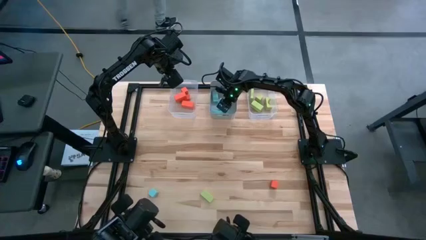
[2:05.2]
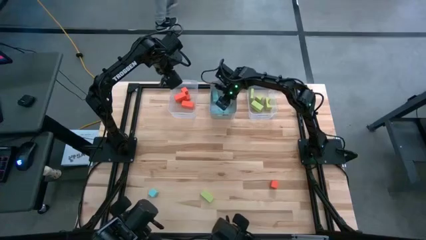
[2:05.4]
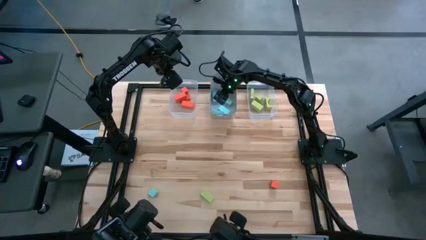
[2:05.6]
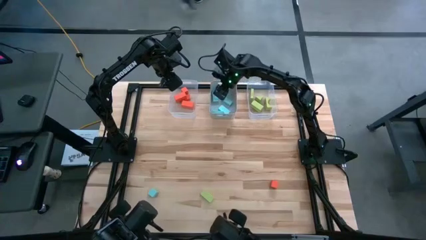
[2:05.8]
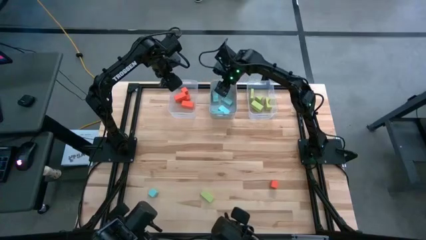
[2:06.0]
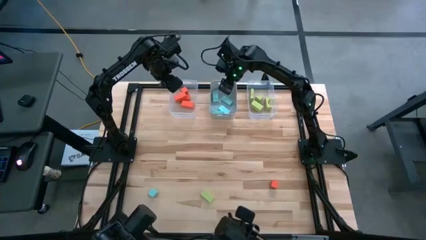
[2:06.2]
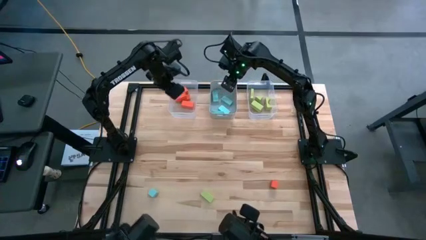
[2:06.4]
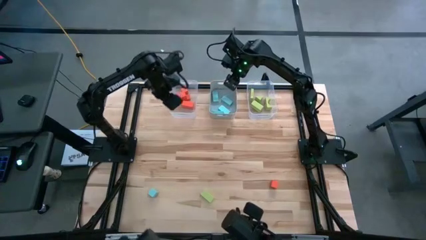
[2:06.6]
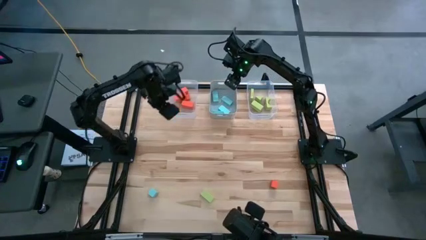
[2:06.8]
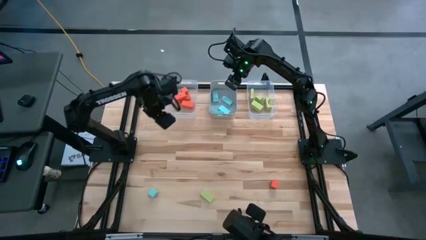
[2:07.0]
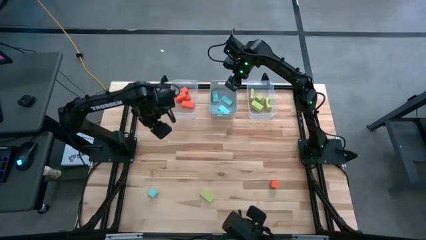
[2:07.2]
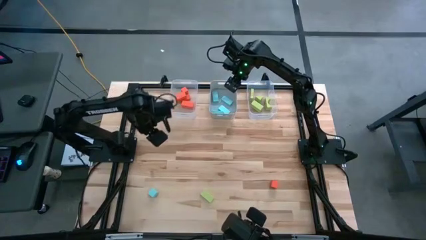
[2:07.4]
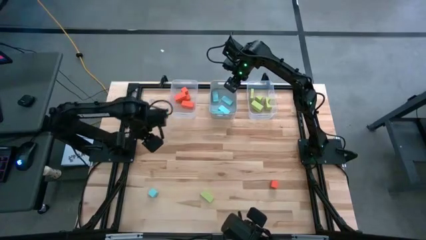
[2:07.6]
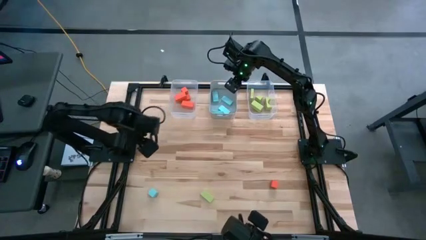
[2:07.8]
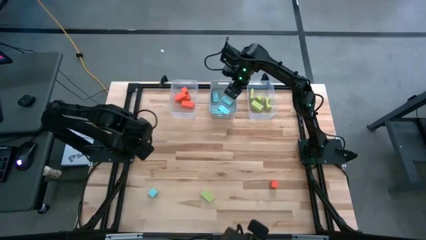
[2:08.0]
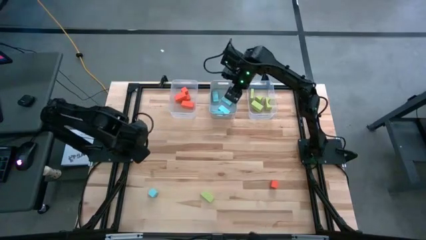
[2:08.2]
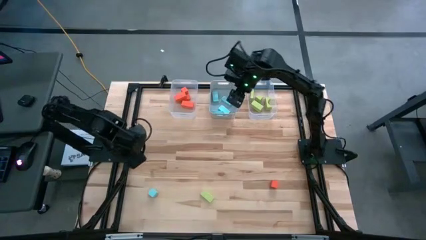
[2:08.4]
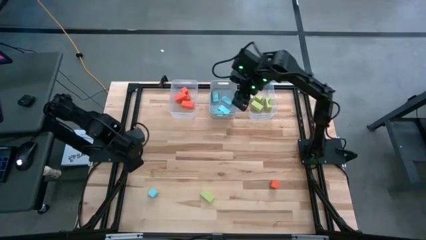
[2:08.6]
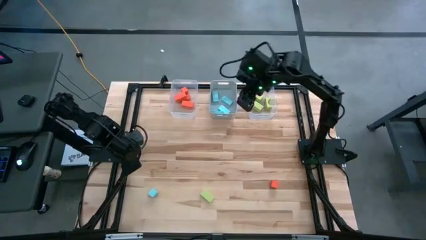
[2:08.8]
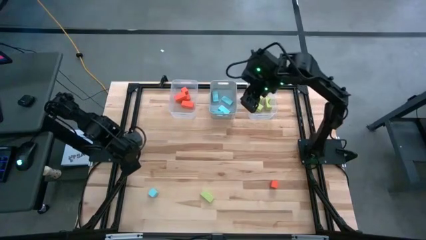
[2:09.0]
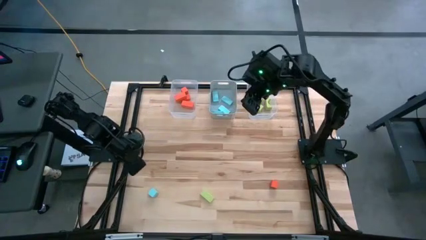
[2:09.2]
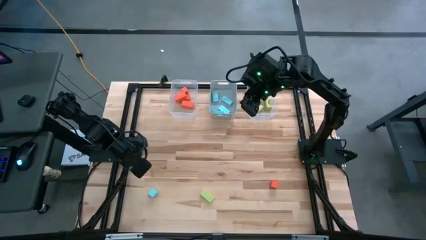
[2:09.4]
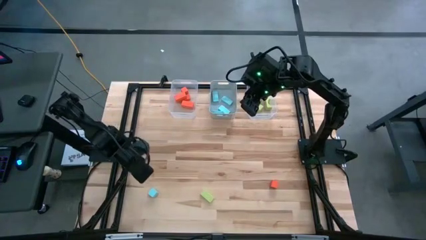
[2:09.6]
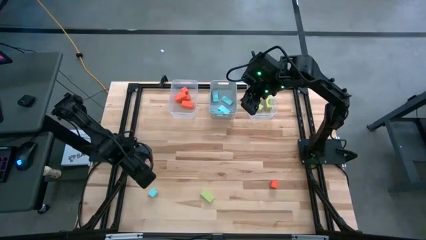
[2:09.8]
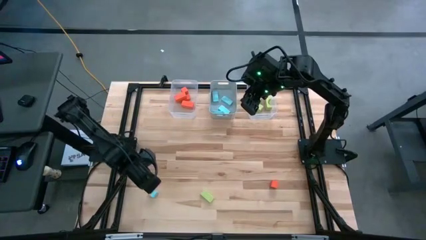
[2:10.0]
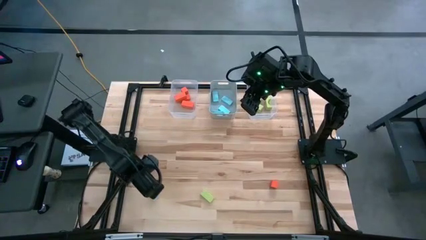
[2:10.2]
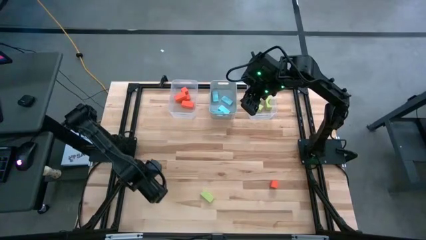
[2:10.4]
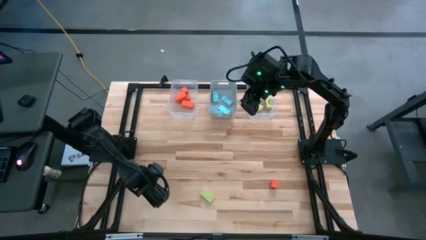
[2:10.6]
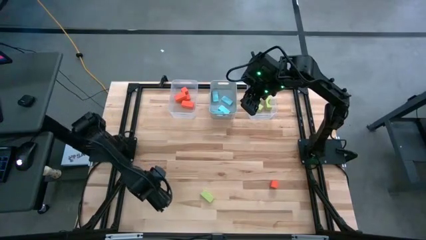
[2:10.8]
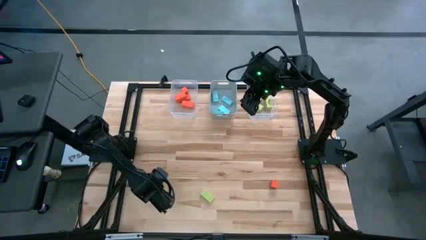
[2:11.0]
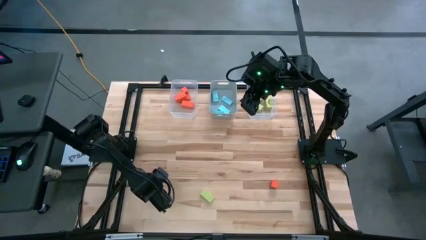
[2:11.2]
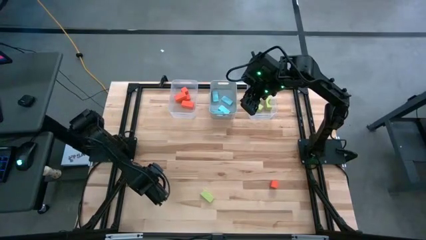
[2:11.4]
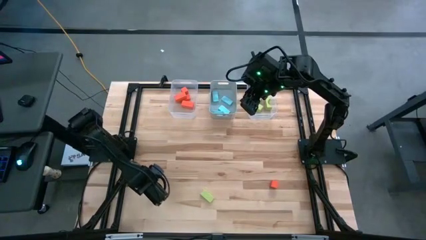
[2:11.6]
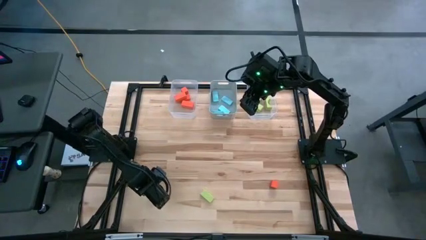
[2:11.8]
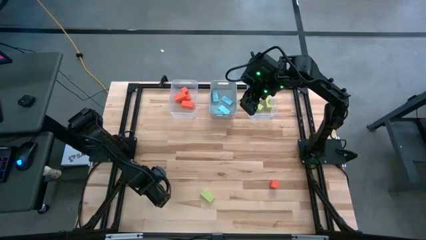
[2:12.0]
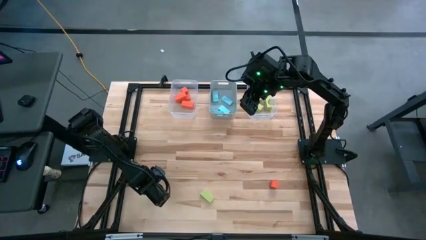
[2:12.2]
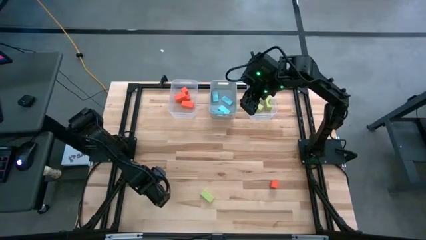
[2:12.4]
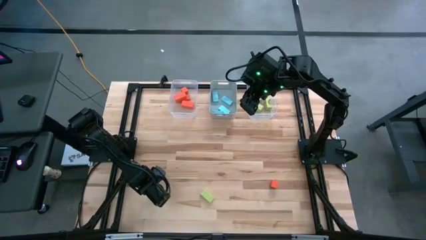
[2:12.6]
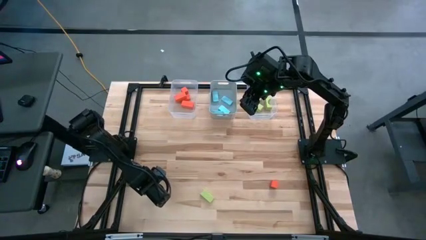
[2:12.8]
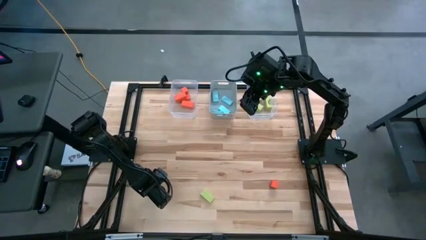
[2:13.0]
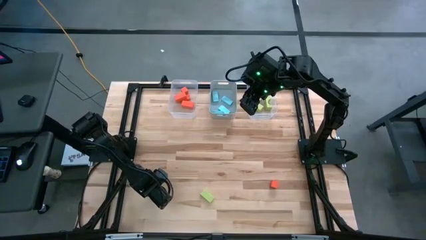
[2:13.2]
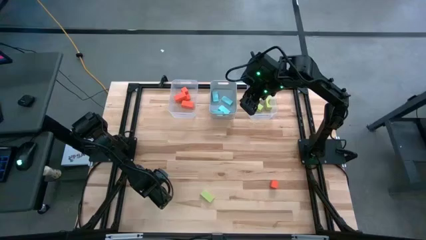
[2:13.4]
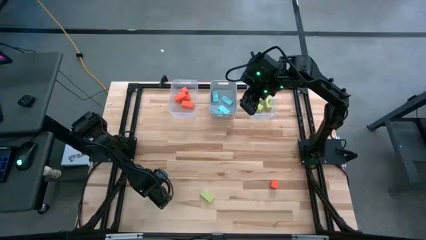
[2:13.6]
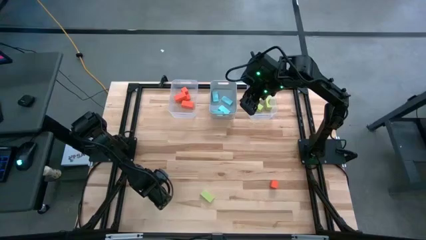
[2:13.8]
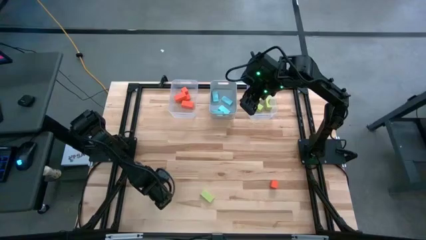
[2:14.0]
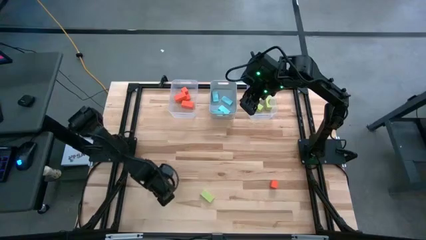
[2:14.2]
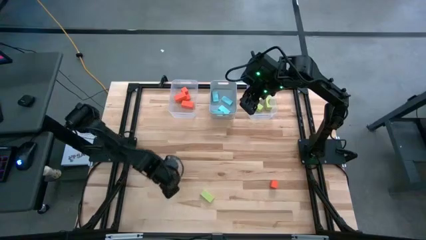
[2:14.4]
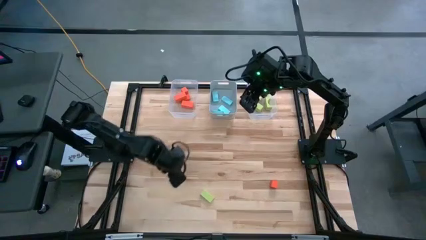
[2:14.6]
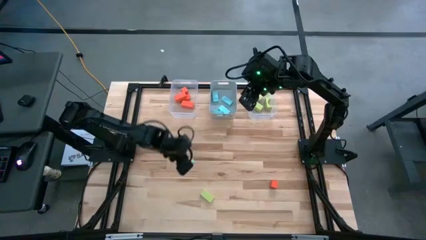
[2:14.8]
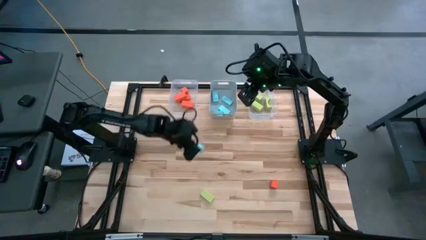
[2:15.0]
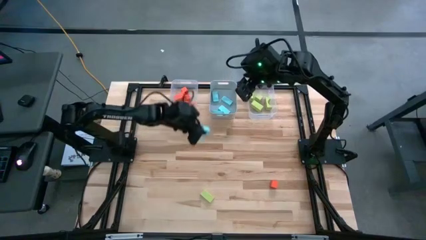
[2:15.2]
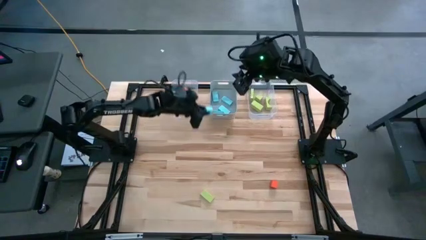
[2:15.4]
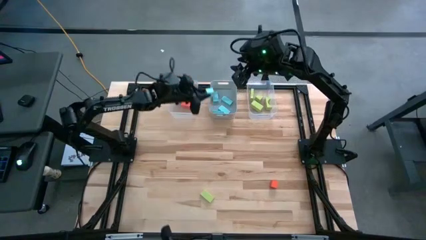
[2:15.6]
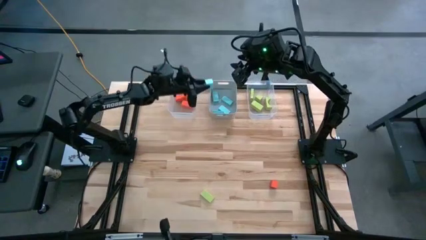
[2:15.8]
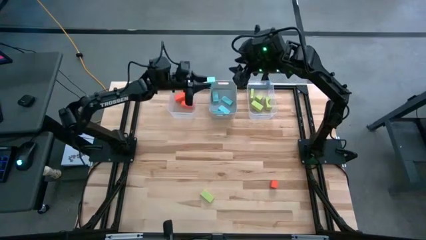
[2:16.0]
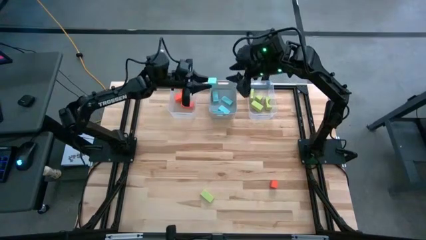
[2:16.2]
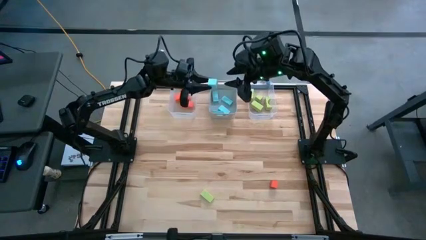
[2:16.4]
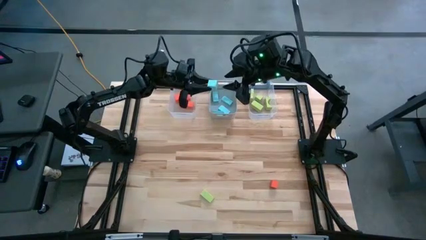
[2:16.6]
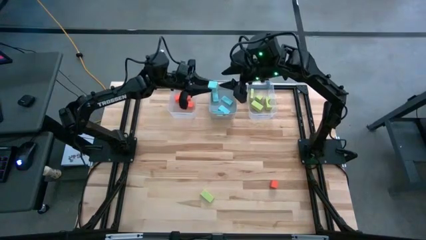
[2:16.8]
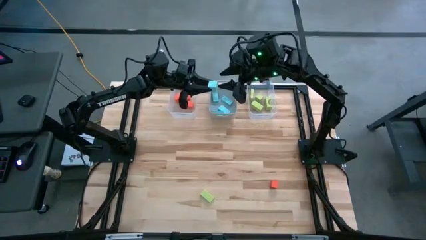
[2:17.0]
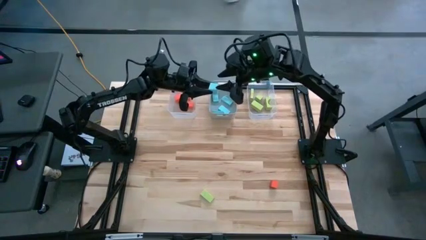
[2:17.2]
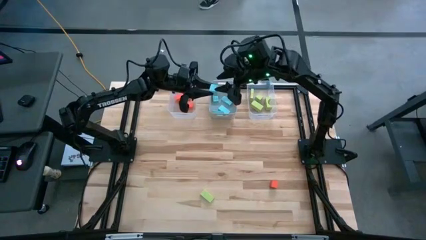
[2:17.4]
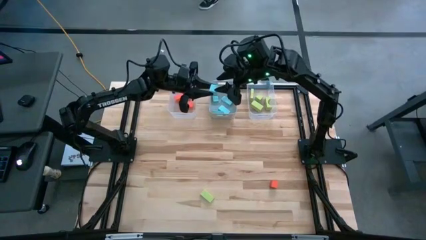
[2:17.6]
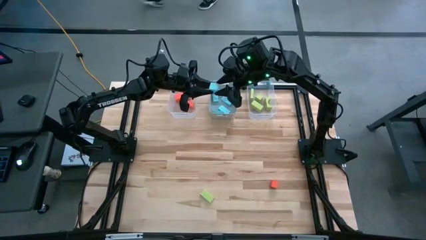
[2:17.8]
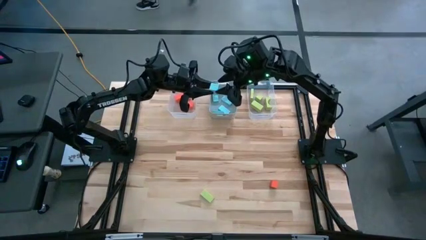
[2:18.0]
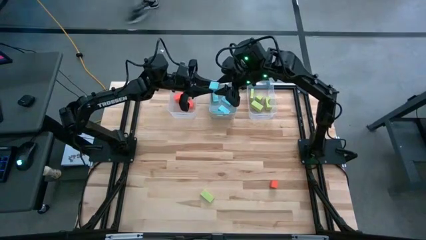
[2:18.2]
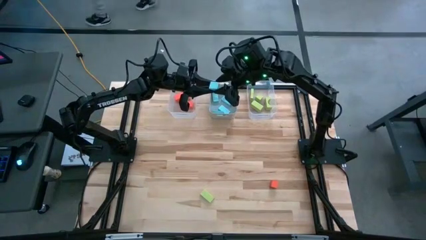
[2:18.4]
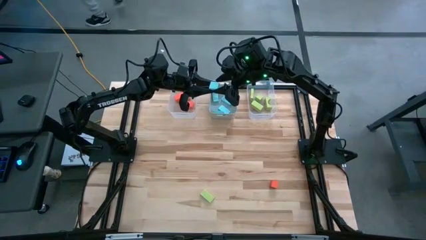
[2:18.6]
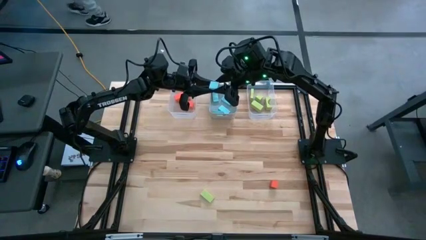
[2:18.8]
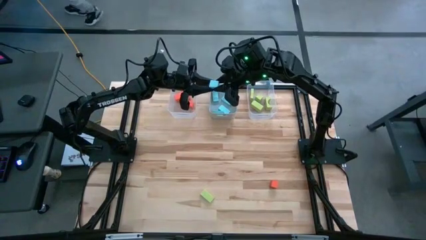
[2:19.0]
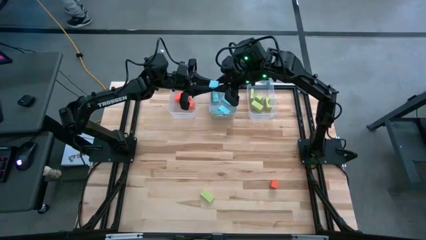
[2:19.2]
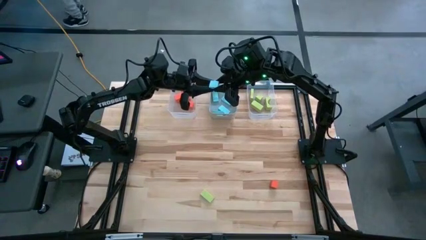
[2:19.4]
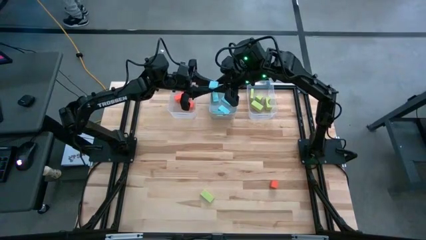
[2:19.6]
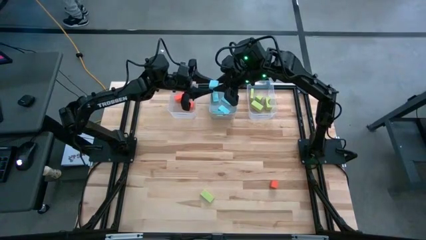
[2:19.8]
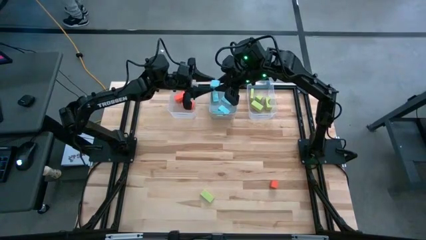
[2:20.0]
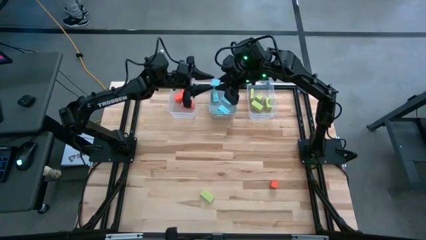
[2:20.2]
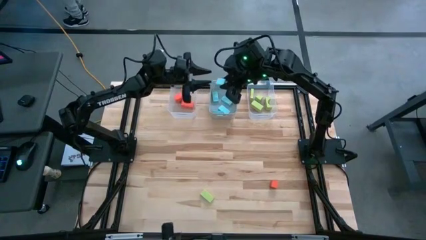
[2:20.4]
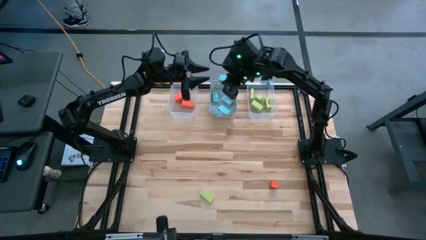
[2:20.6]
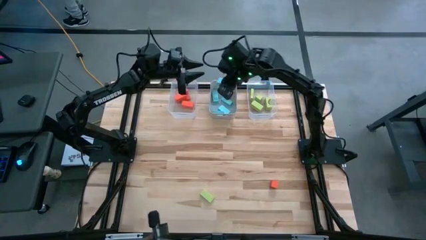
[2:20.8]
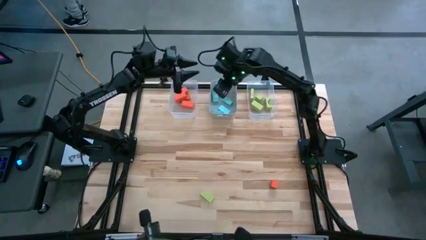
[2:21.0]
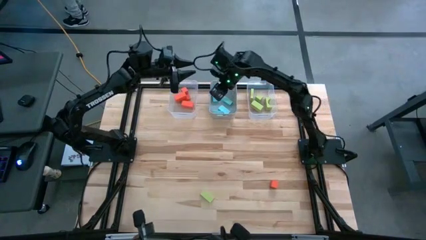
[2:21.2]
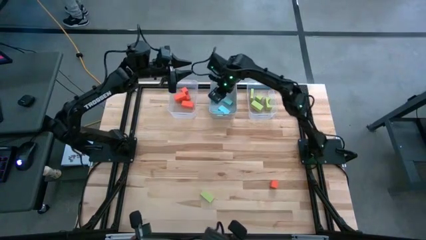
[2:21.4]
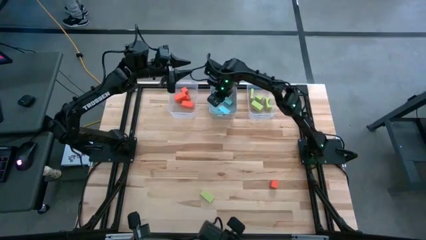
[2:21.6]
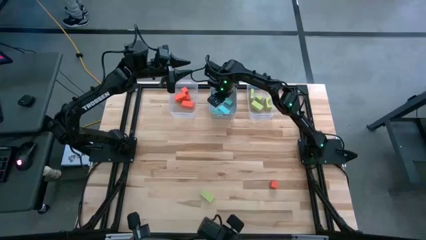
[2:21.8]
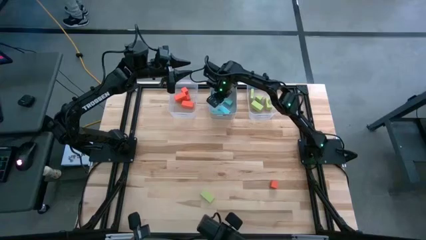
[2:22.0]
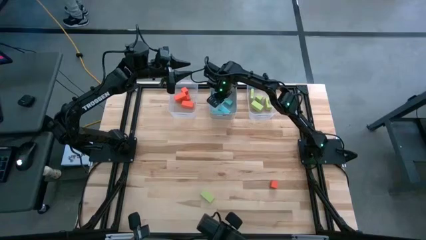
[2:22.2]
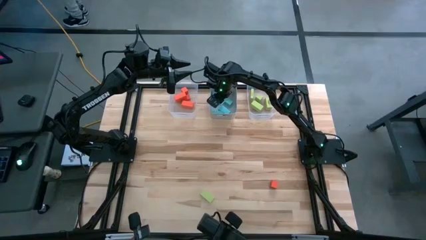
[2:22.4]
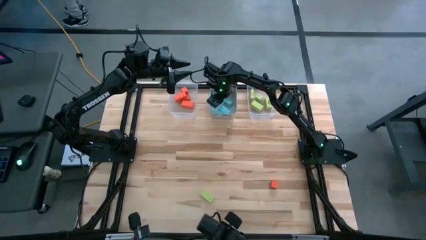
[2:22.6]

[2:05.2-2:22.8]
Task: Sort & place blocks by color
Put the blue block into the grey bin
